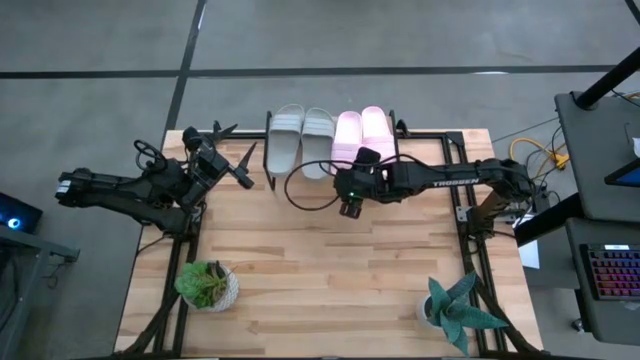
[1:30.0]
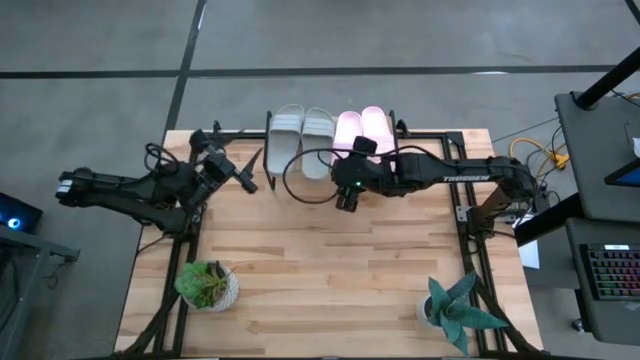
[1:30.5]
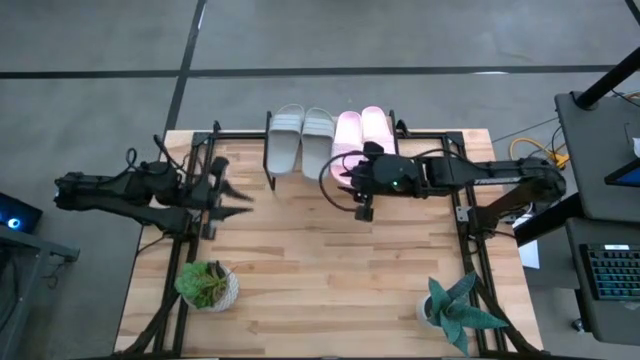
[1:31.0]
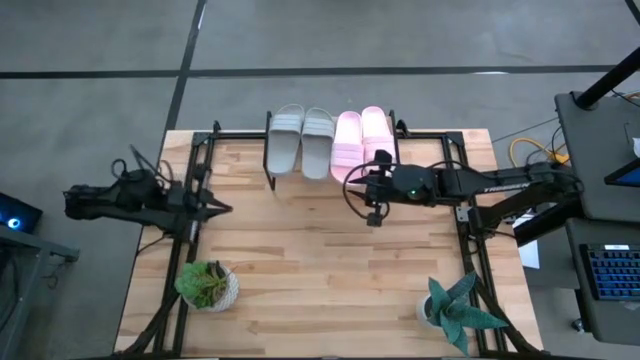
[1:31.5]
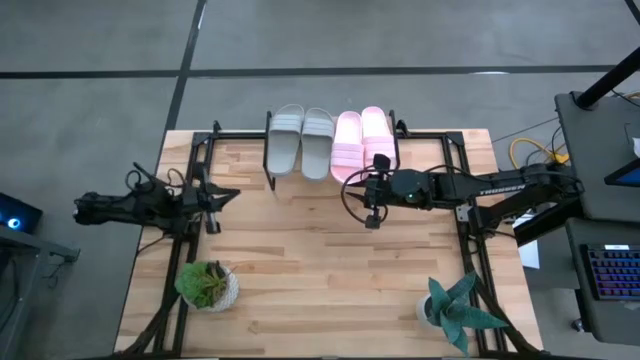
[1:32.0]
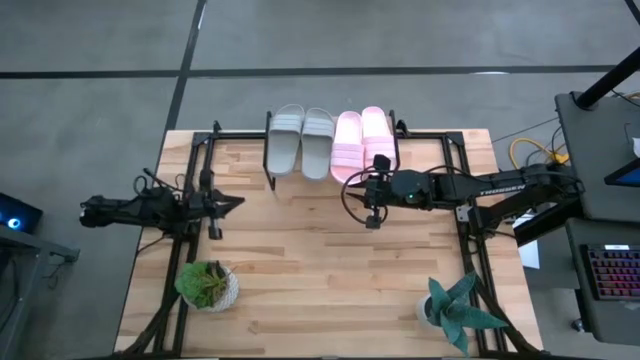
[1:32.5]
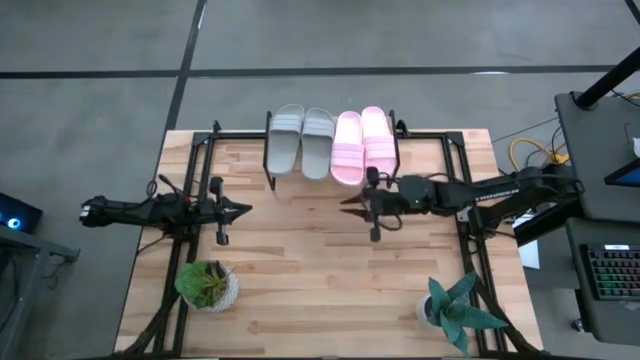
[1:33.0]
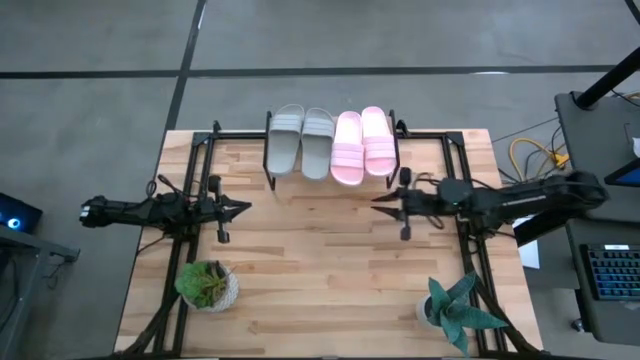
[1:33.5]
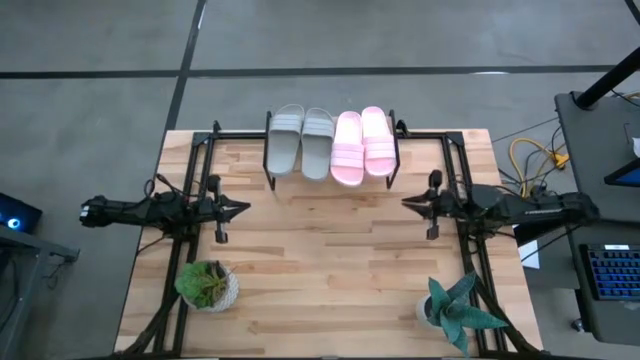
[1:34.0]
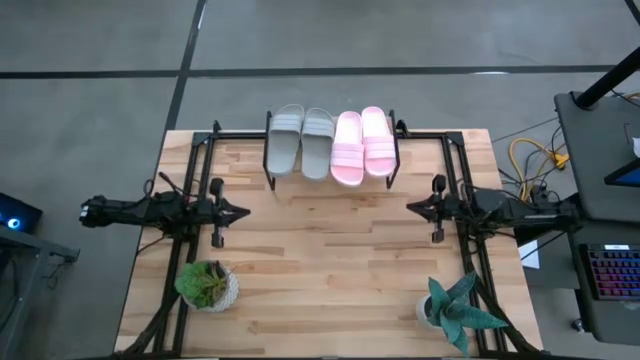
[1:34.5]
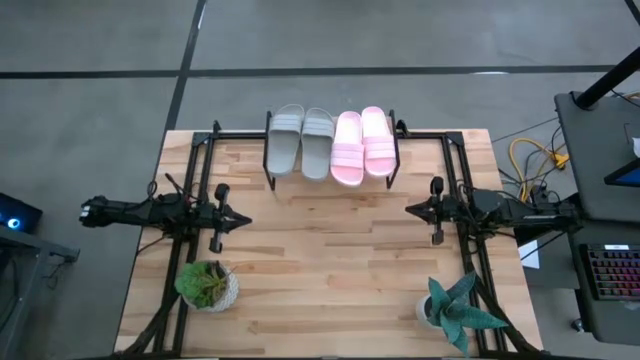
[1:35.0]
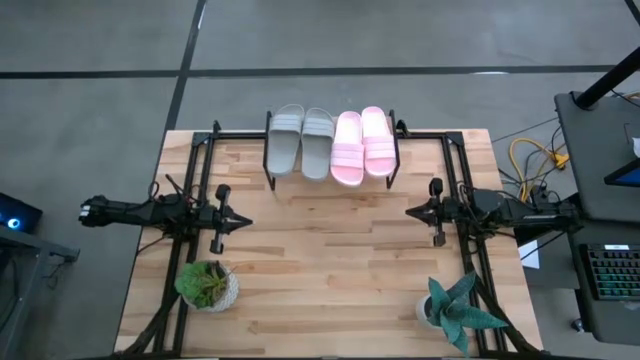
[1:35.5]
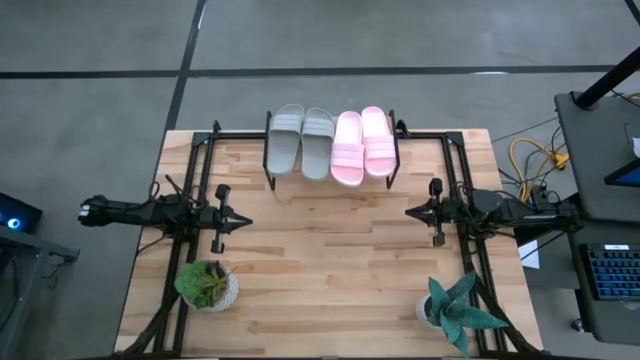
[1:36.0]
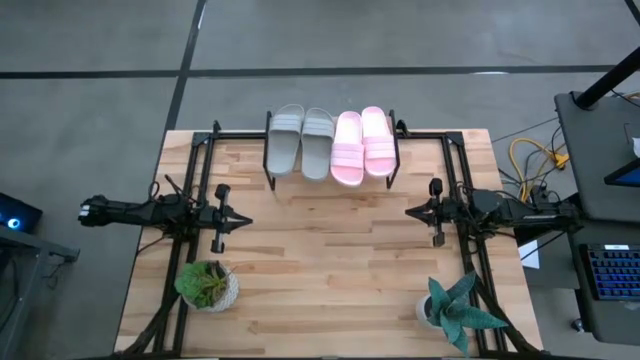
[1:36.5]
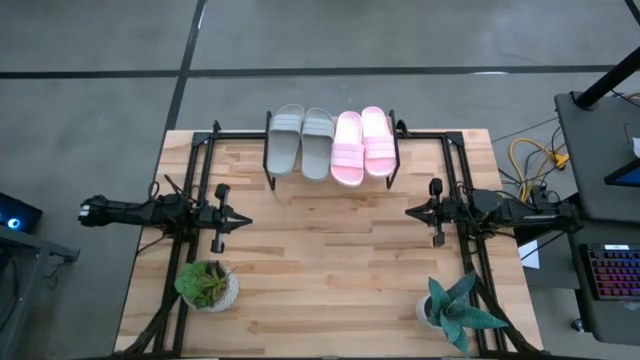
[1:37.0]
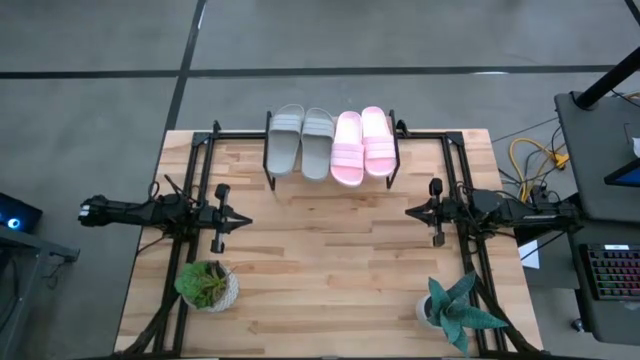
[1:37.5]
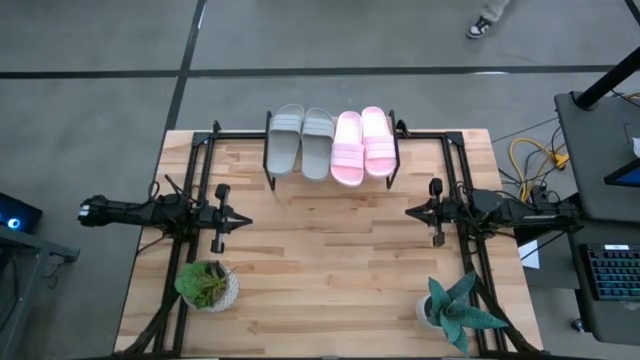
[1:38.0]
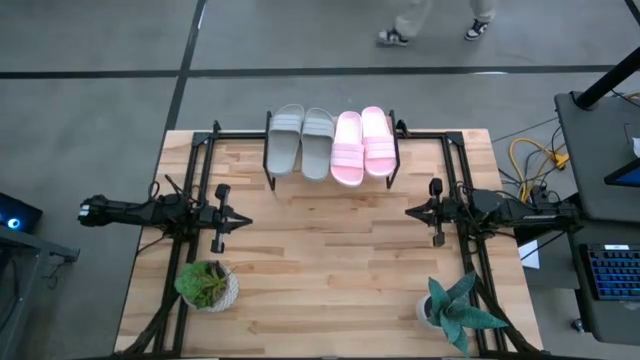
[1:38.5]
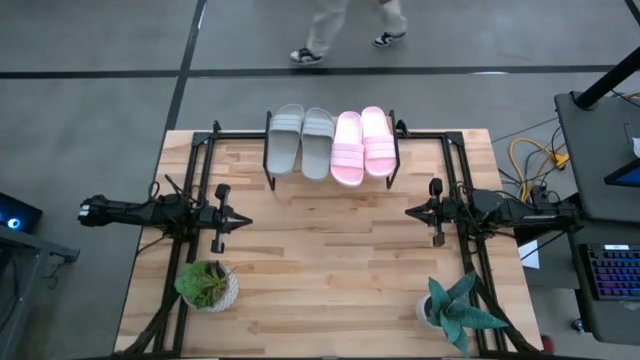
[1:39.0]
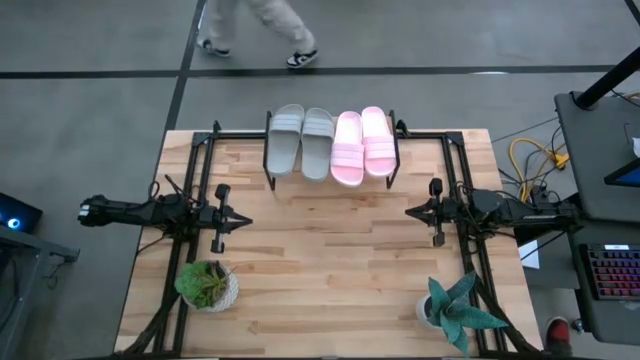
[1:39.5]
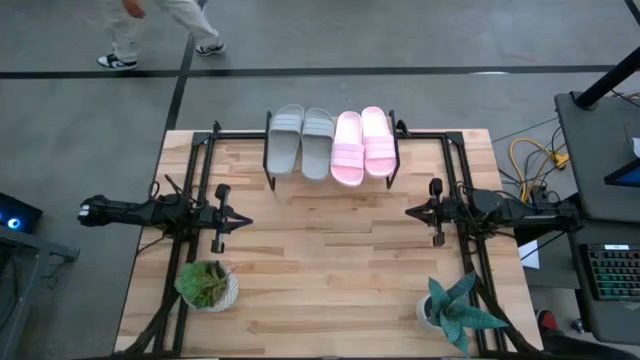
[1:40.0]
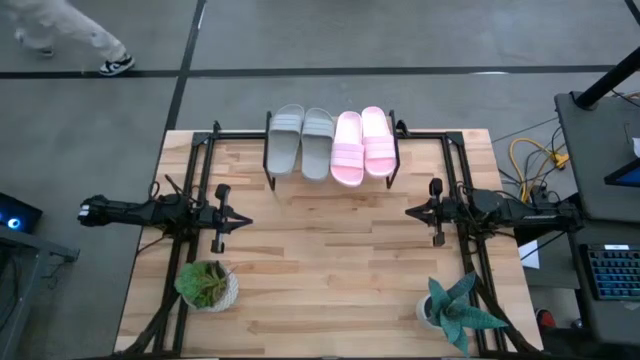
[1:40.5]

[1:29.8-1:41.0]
Task: Pick and place slides into the shelf
Return to Home Position

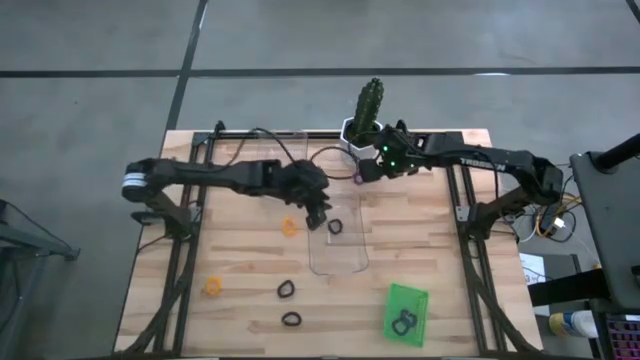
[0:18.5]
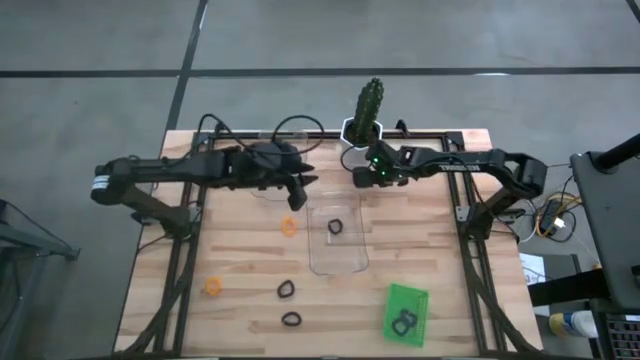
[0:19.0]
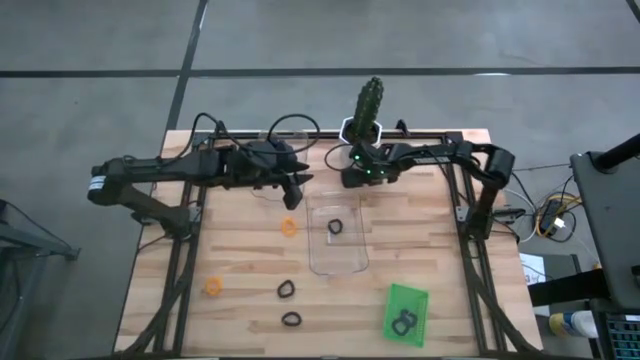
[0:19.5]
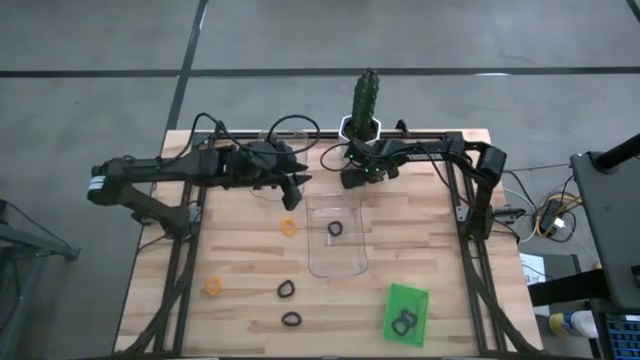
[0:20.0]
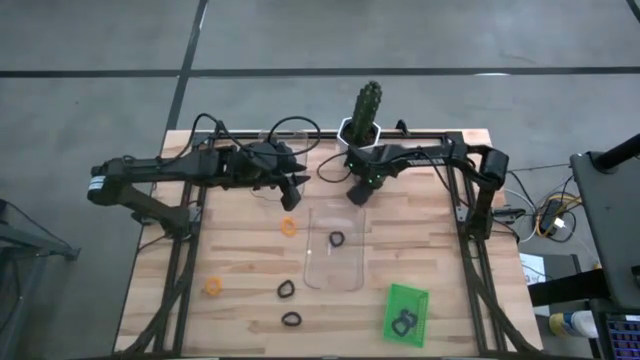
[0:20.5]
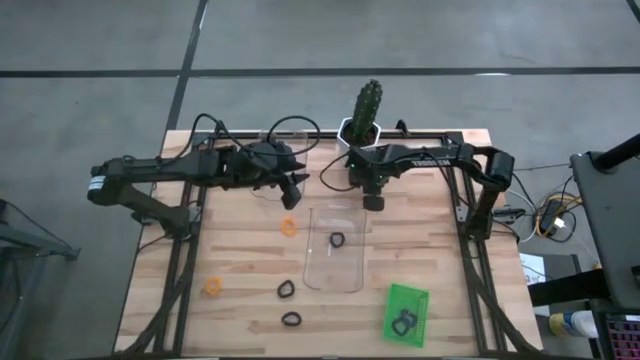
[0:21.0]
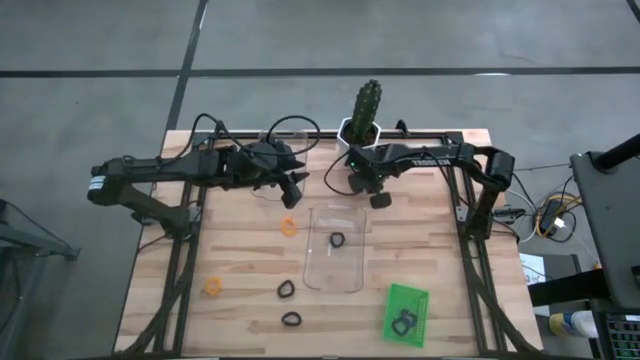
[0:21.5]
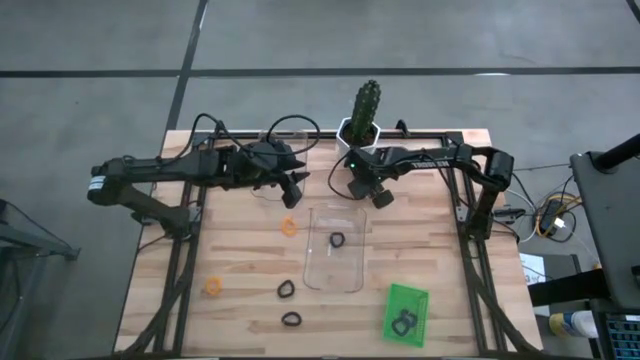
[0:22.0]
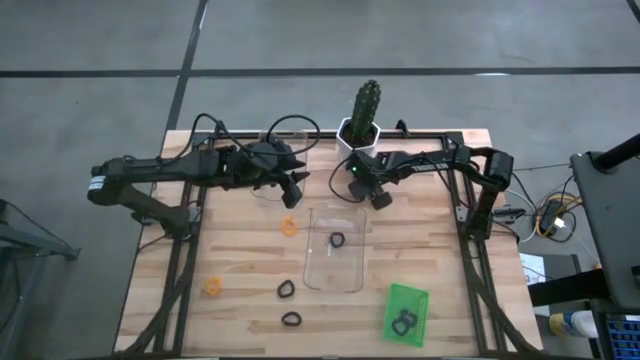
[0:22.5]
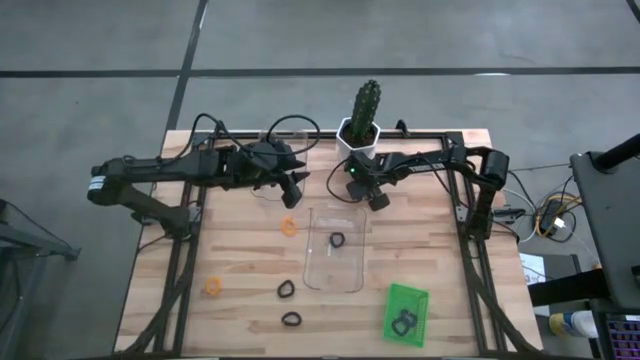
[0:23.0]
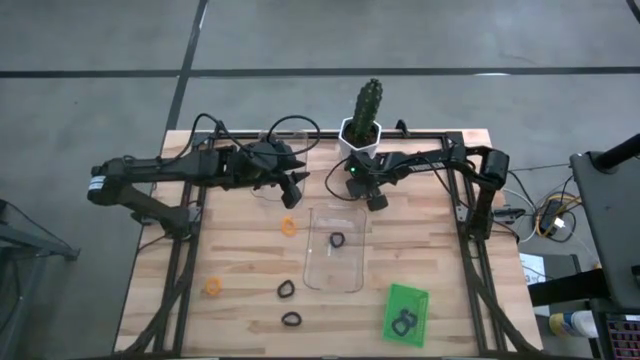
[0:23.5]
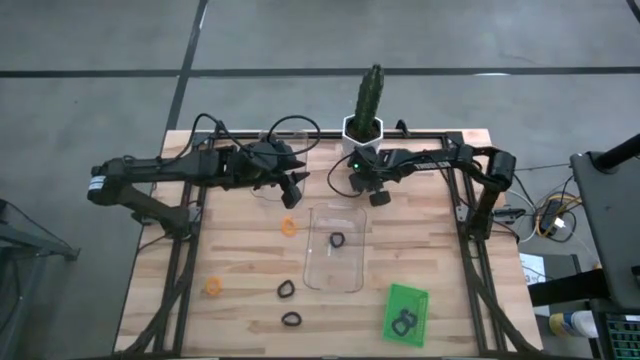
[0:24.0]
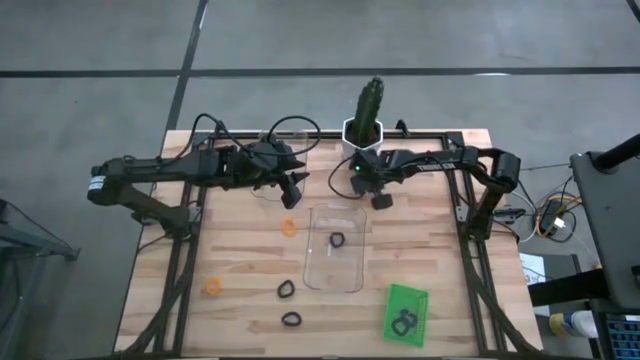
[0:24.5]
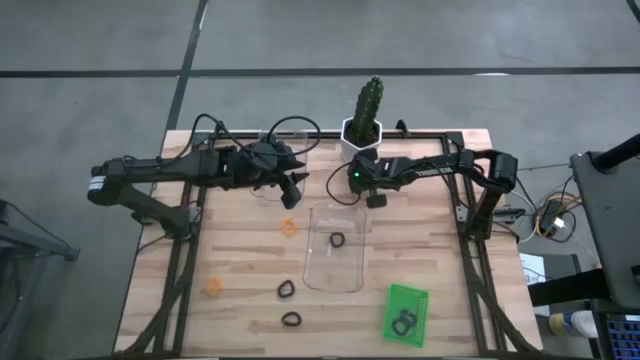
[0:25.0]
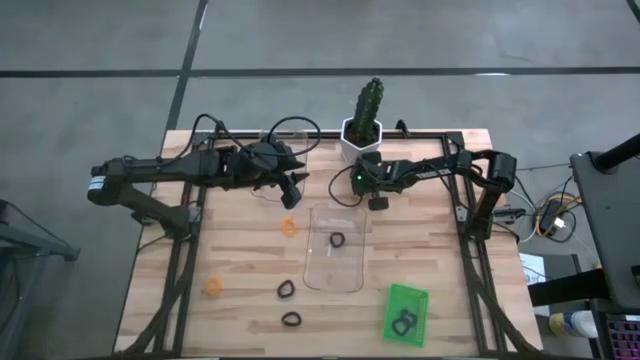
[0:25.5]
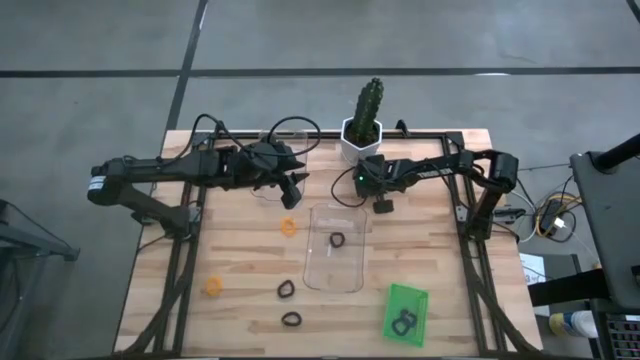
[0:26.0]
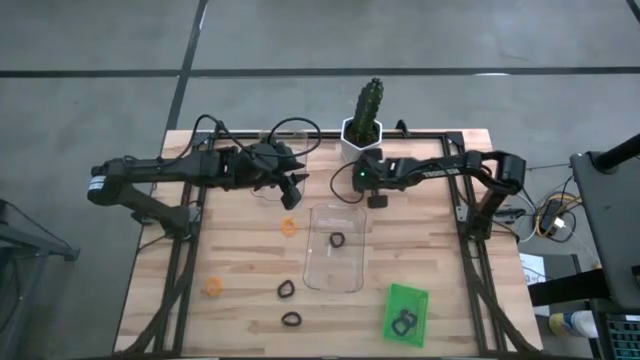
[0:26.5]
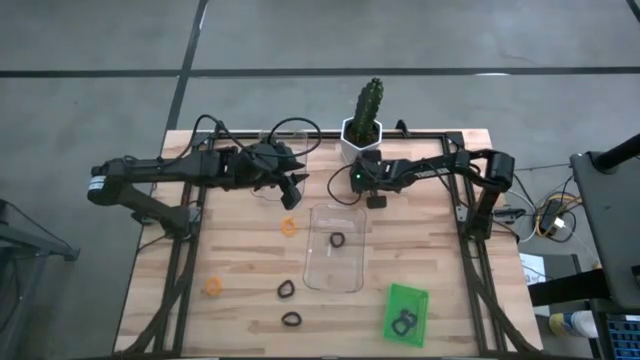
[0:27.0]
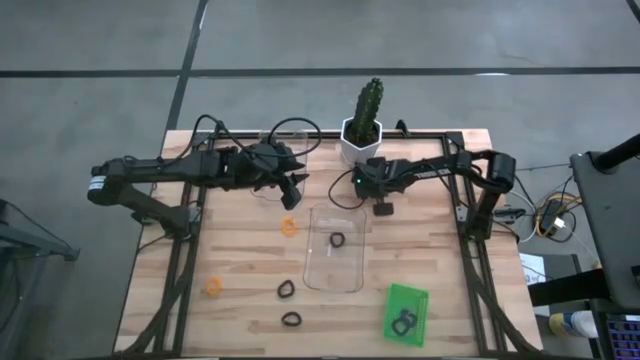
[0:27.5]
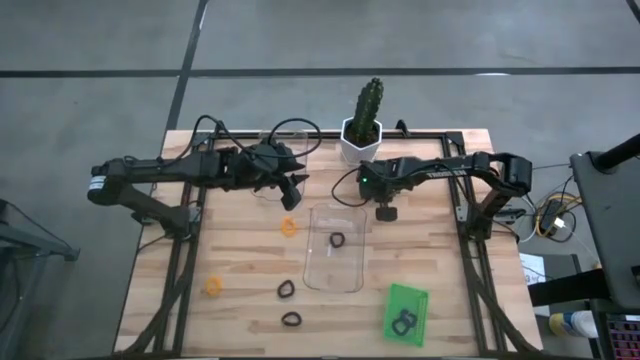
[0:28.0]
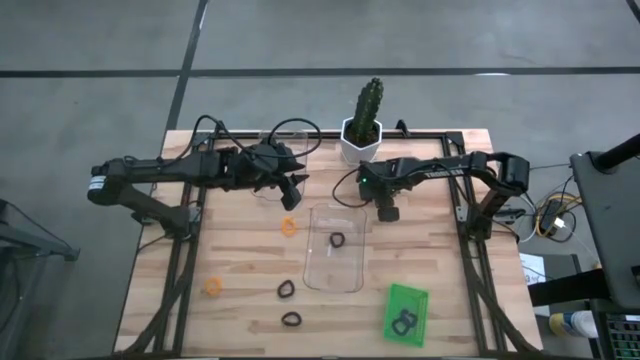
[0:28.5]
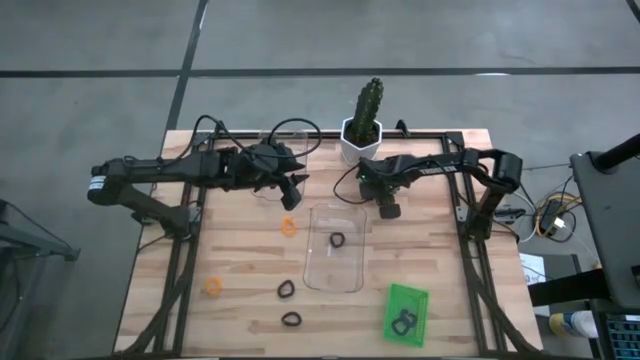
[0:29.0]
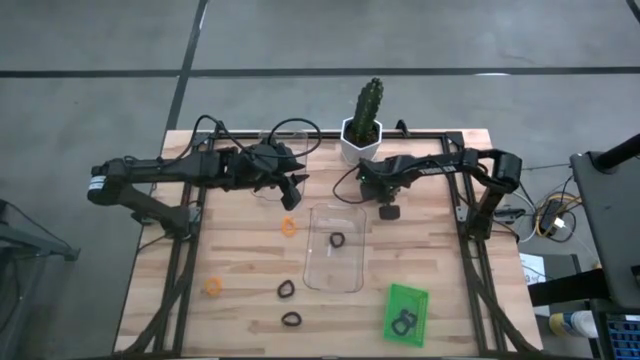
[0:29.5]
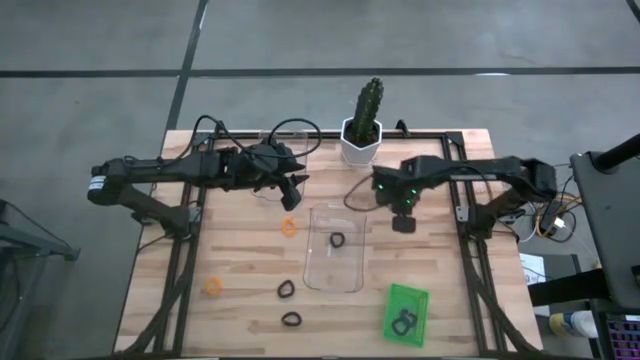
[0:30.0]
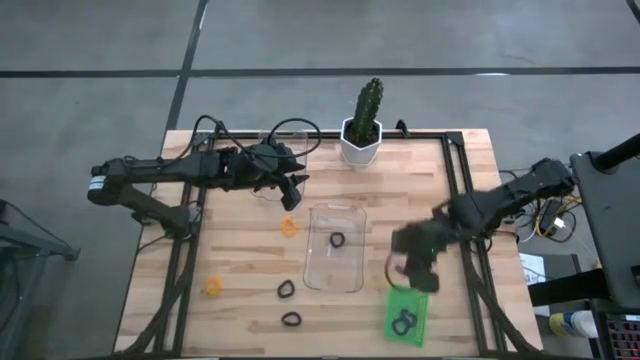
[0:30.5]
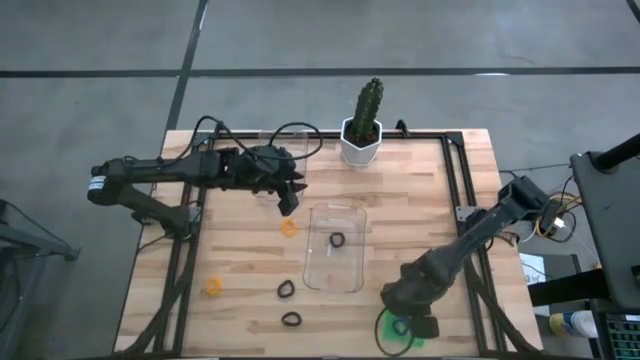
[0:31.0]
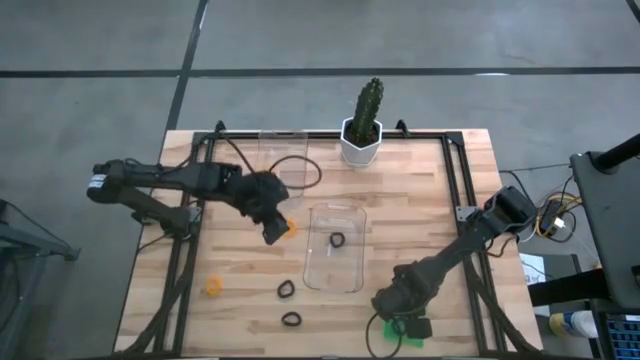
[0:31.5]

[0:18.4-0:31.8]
Task: Sort spring keychains
Put the purple spring keychain into the green bin
